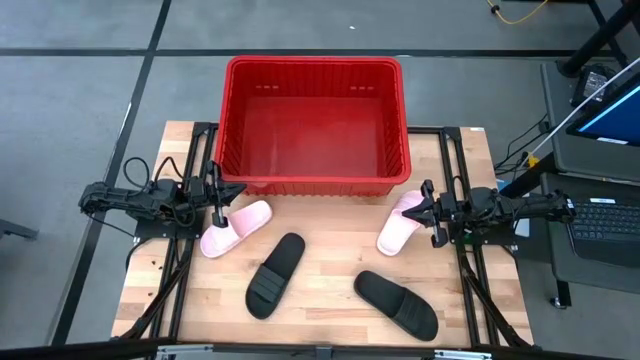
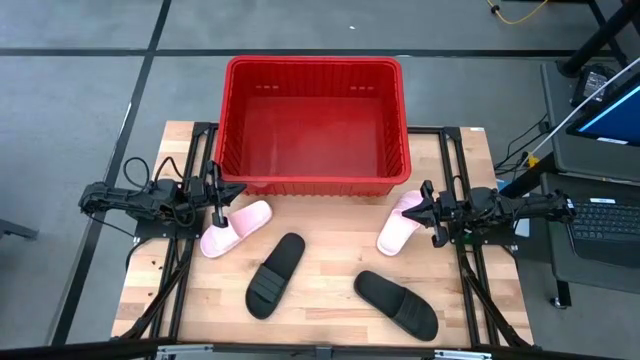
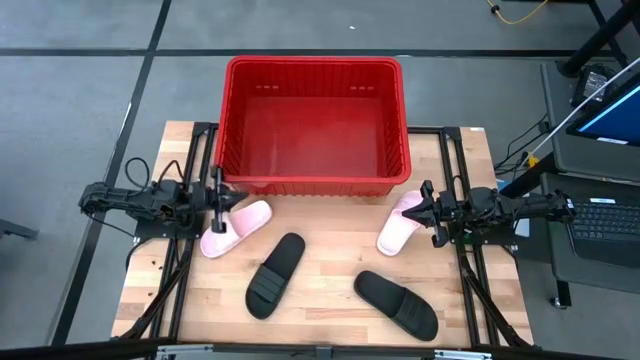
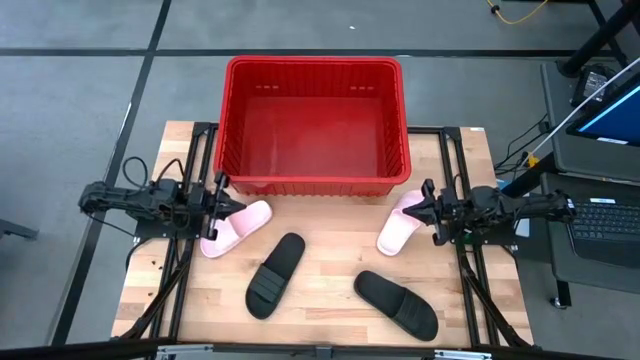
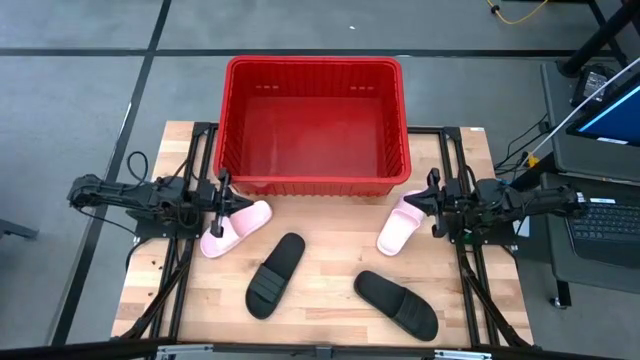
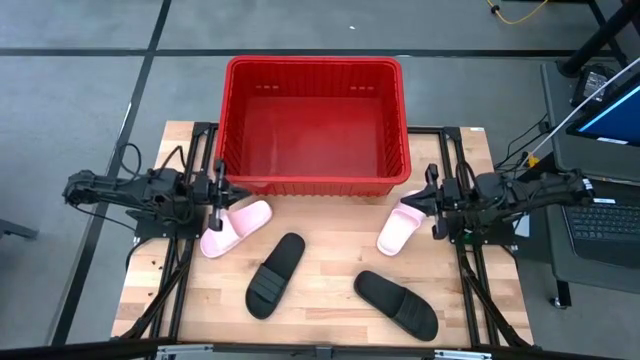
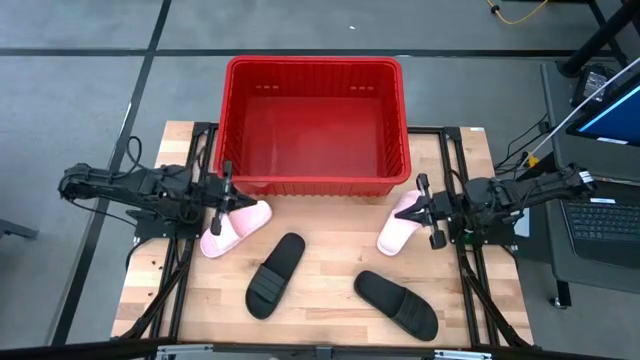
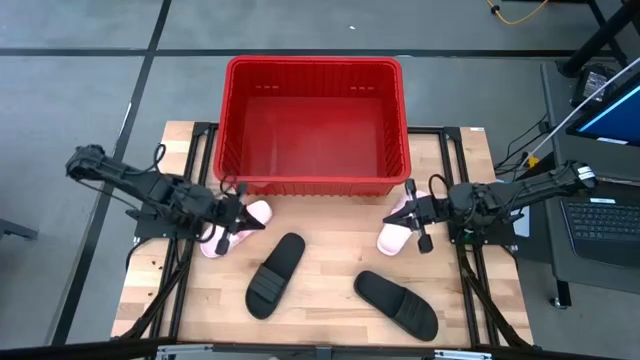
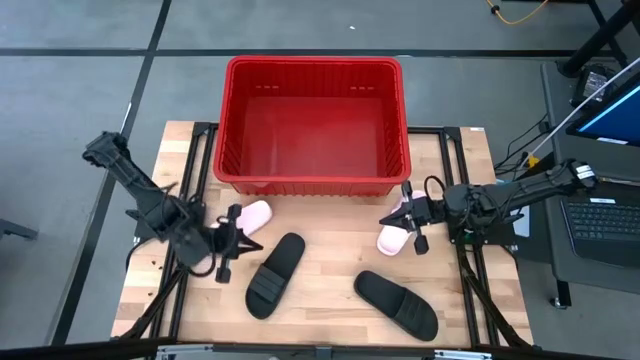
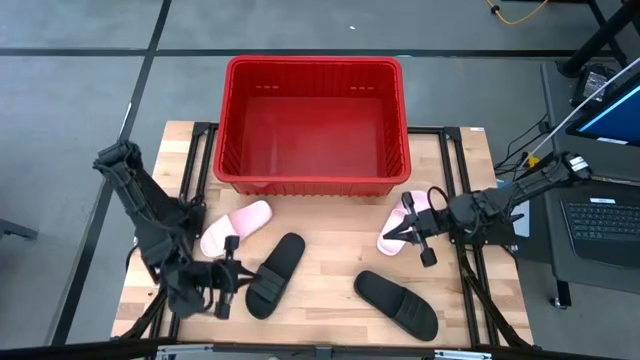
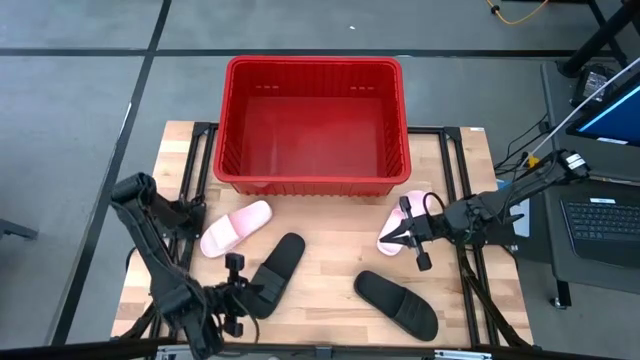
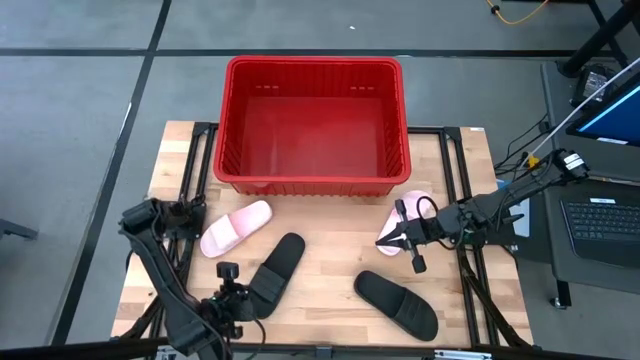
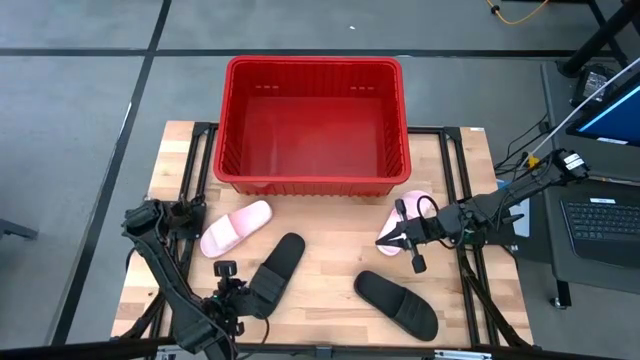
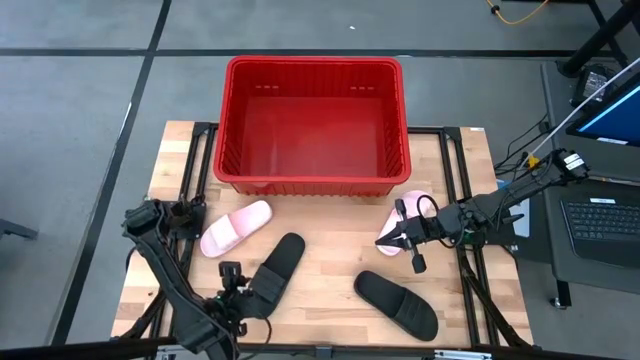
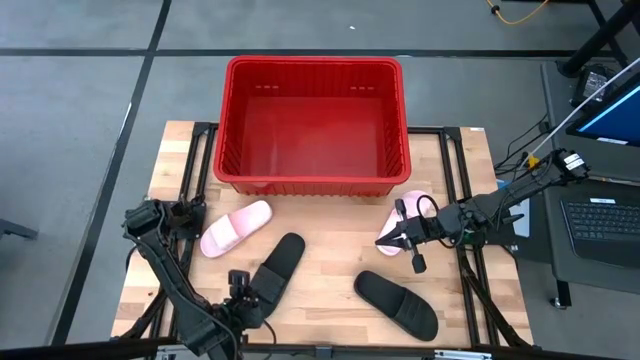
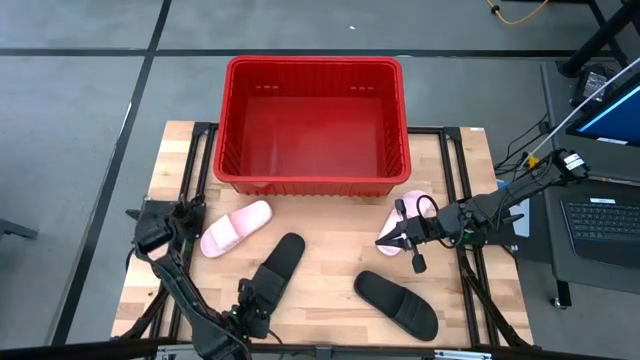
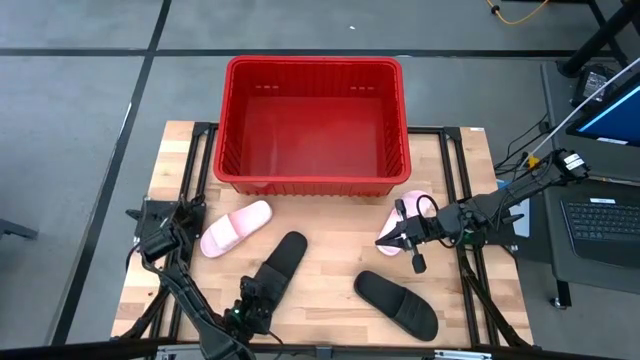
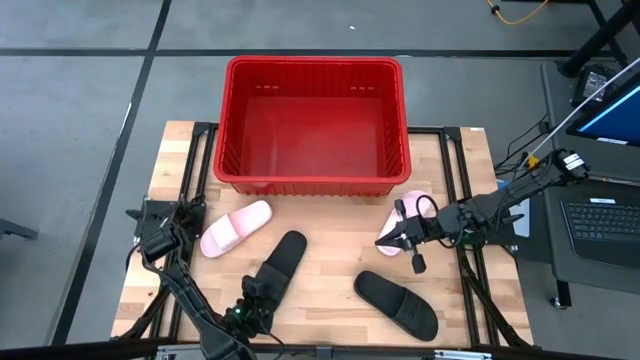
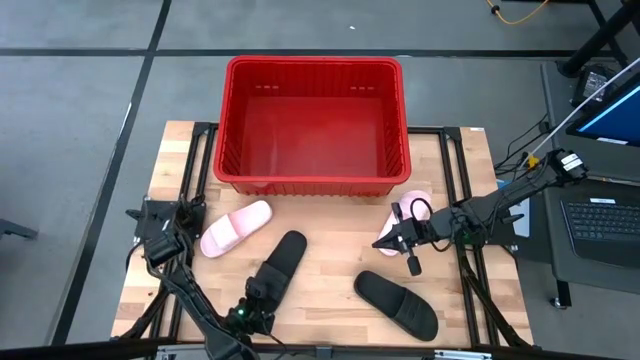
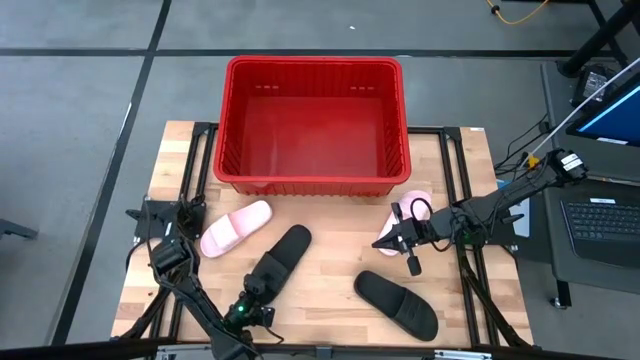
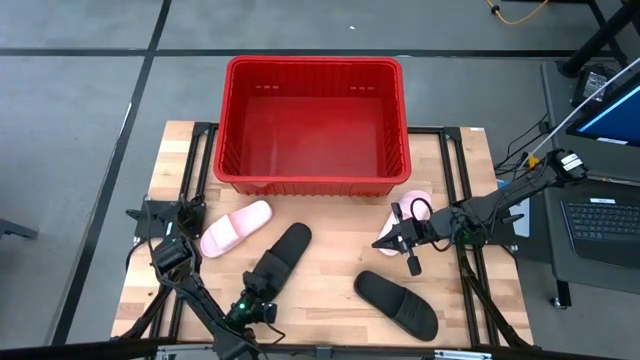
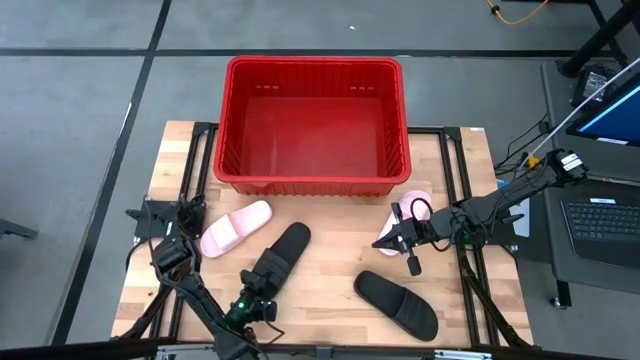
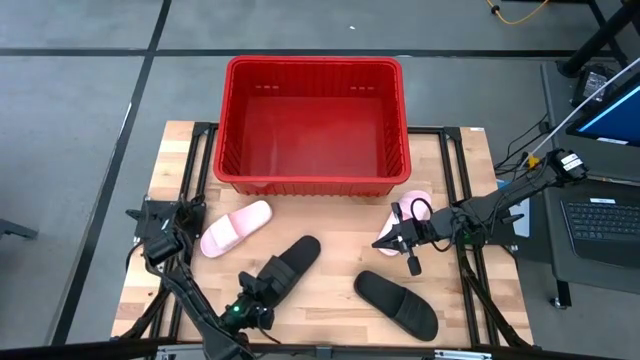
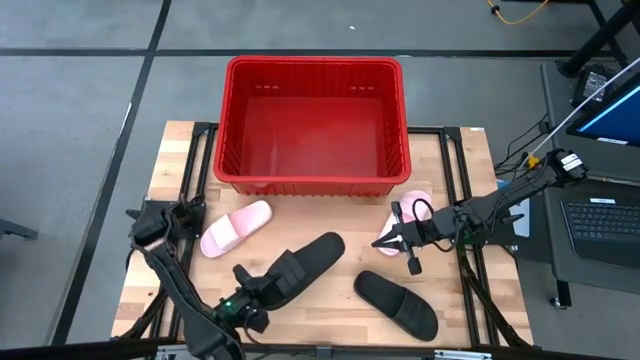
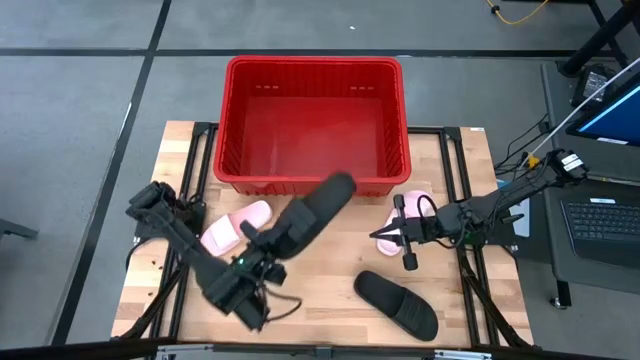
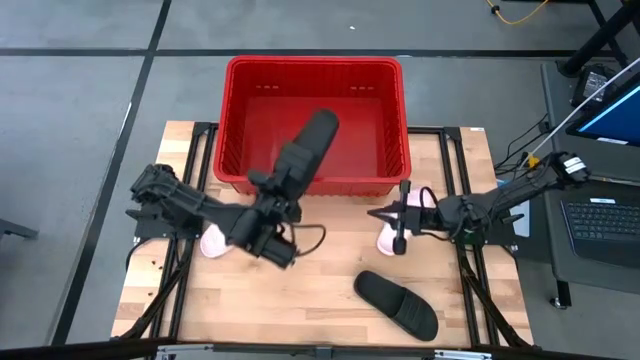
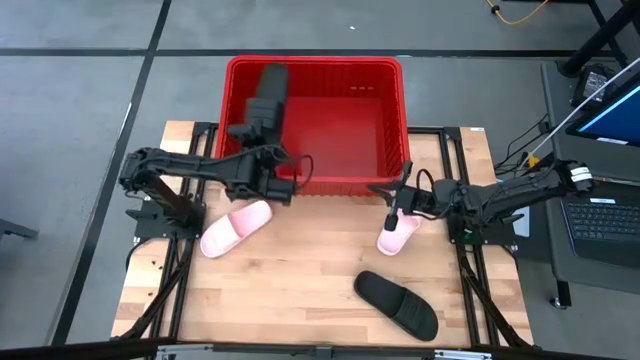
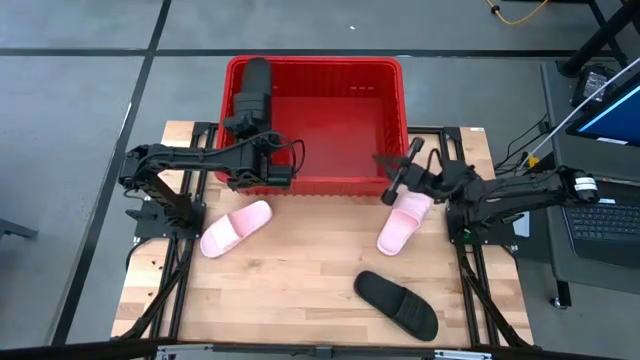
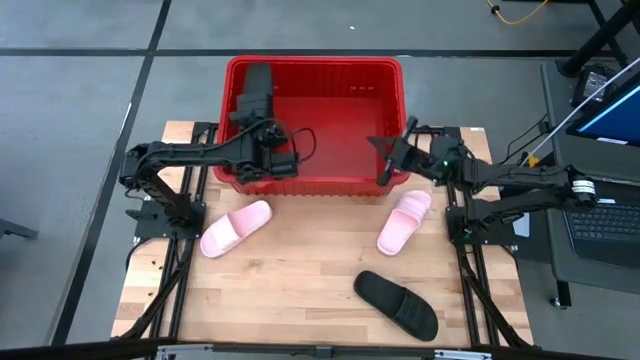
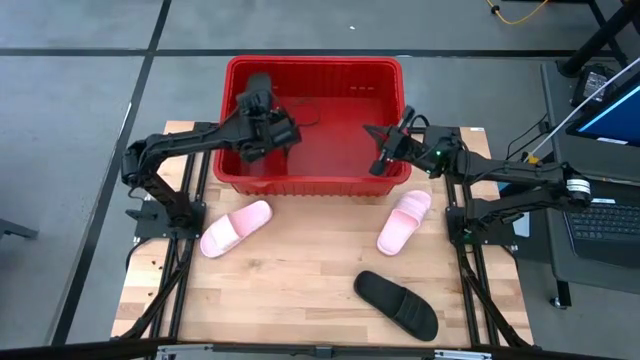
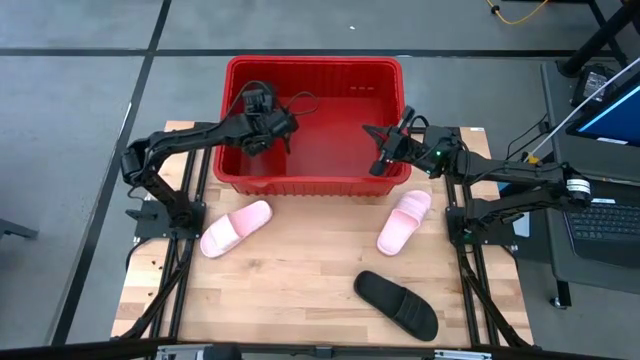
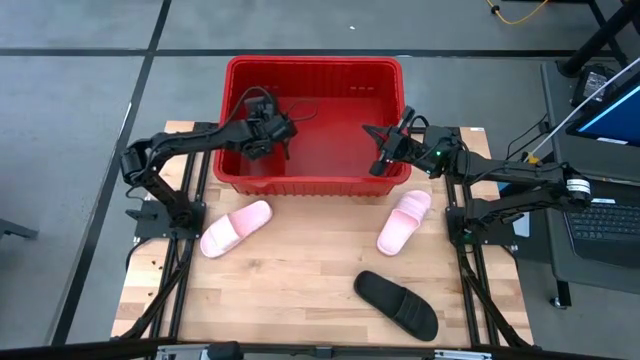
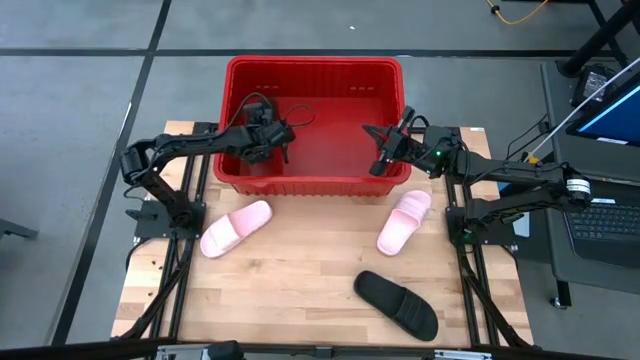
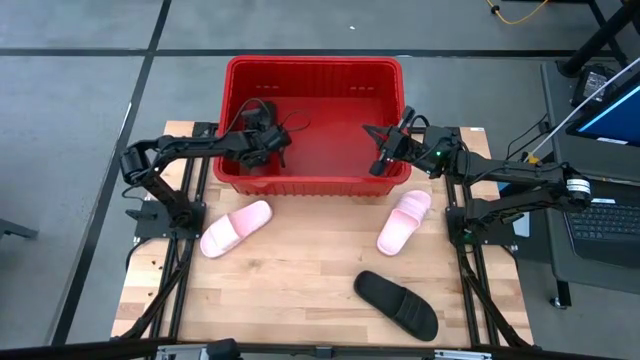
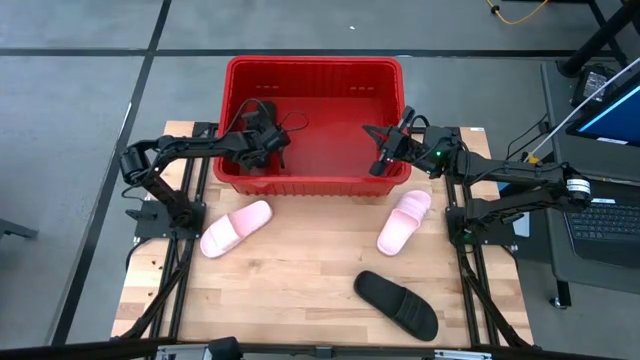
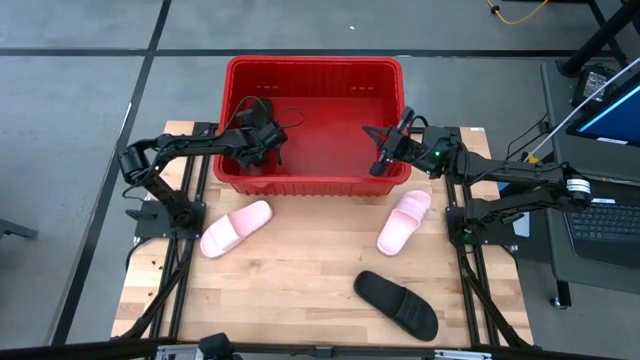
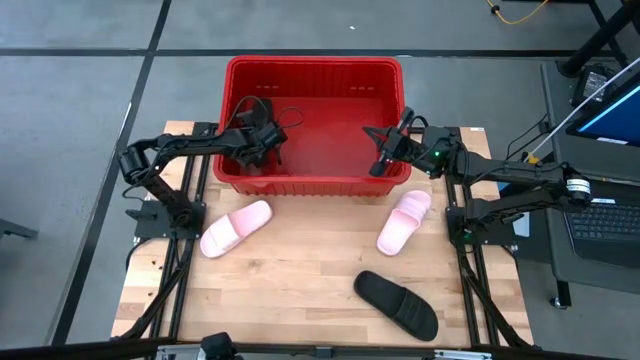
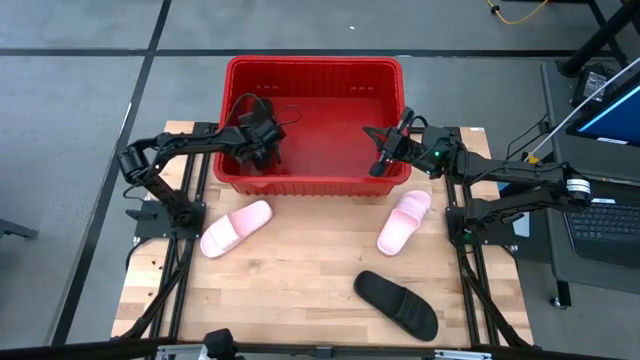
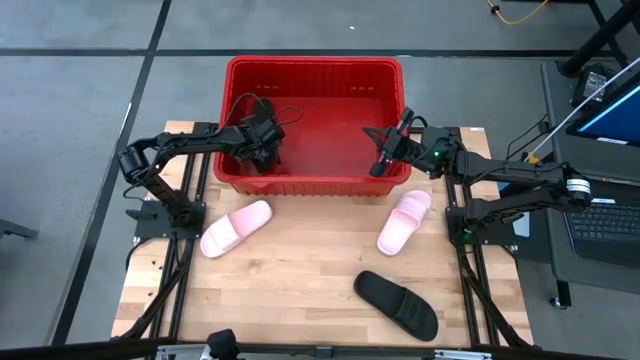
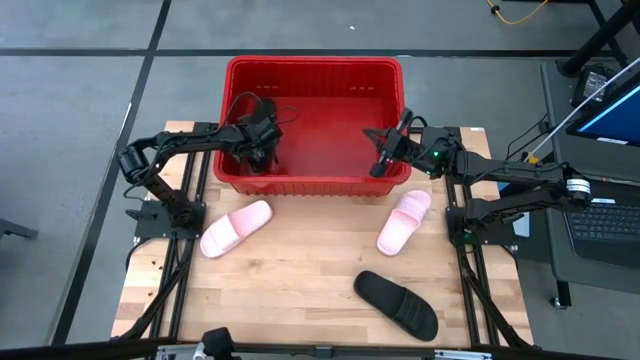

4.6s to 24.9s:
Task: Pick and place slides into bin
Put the left black slide into the red bin
